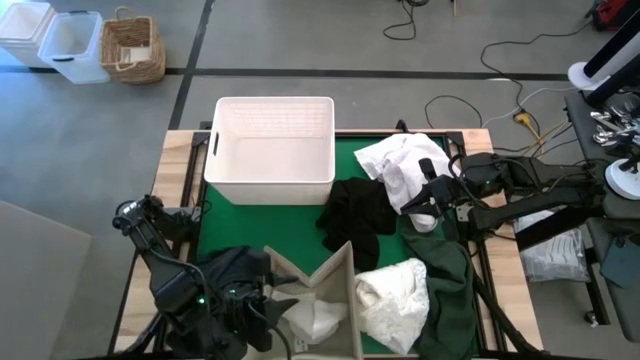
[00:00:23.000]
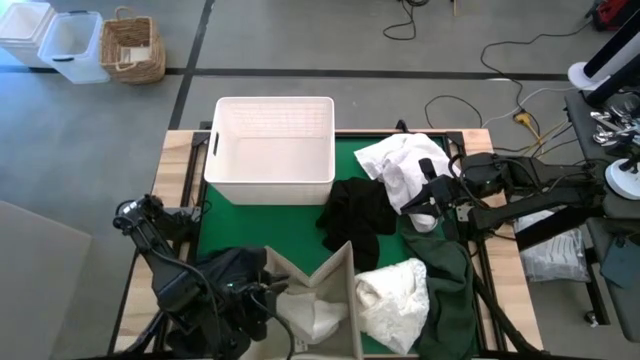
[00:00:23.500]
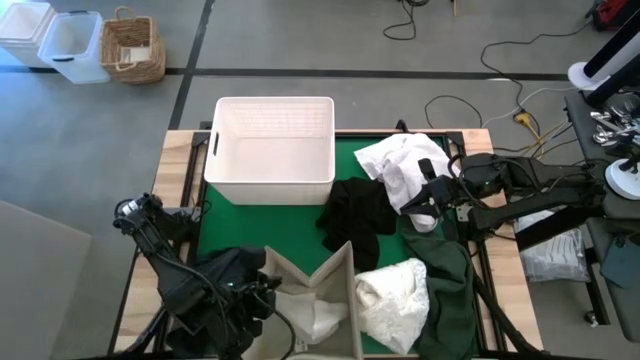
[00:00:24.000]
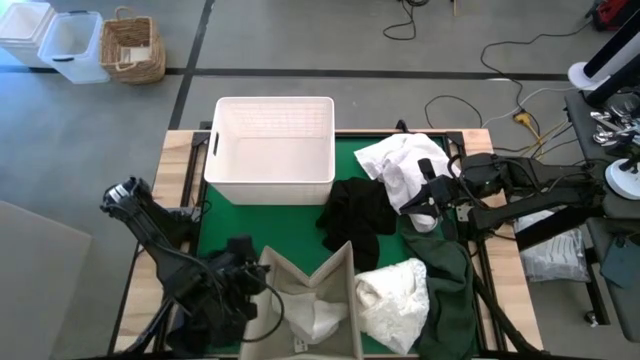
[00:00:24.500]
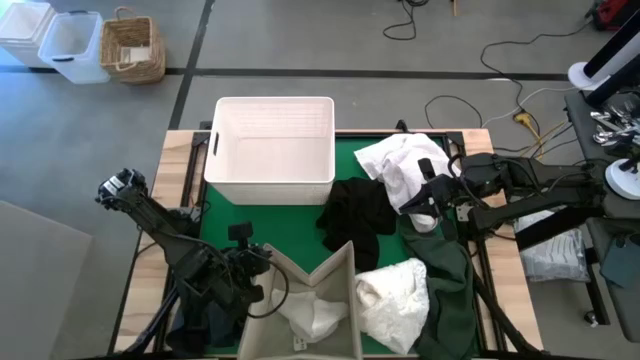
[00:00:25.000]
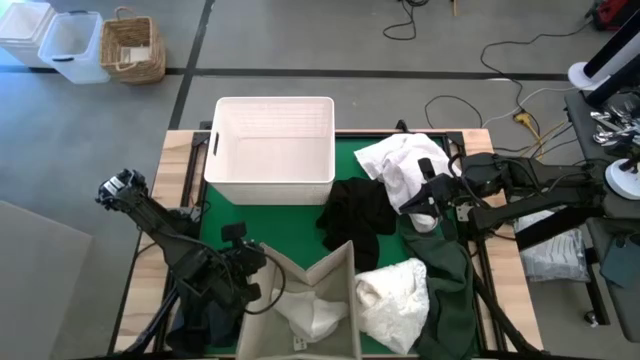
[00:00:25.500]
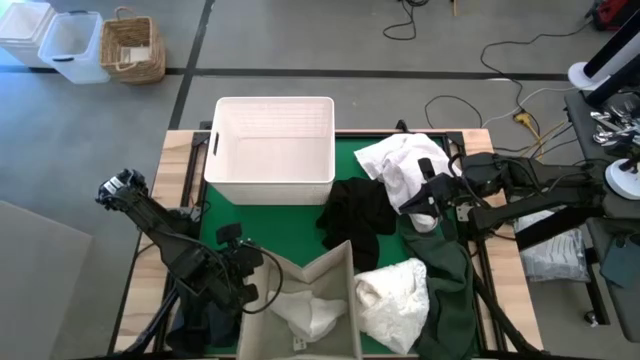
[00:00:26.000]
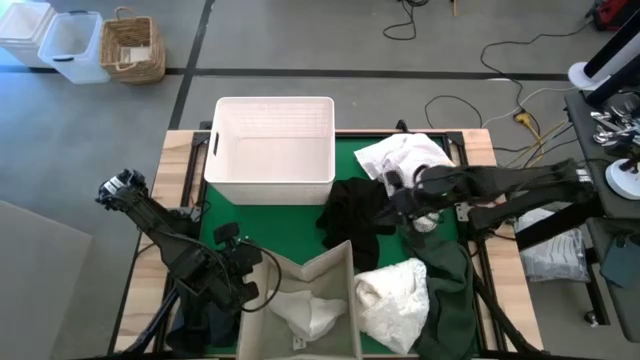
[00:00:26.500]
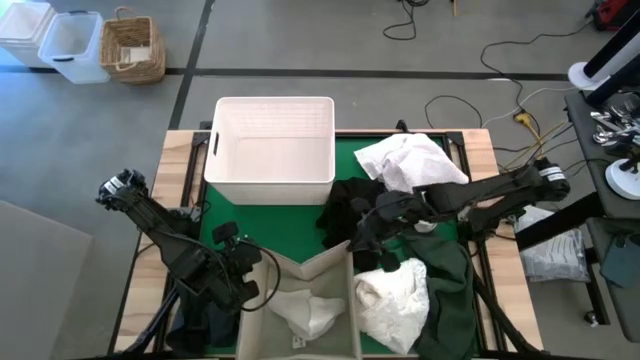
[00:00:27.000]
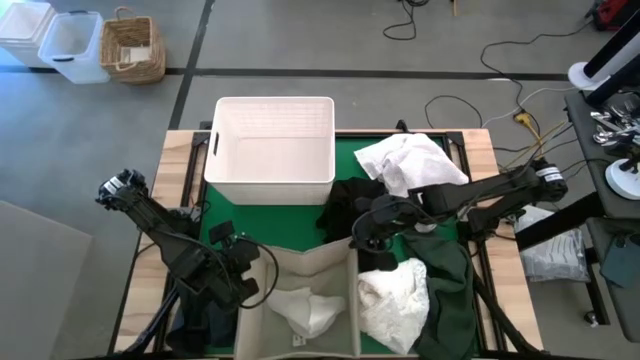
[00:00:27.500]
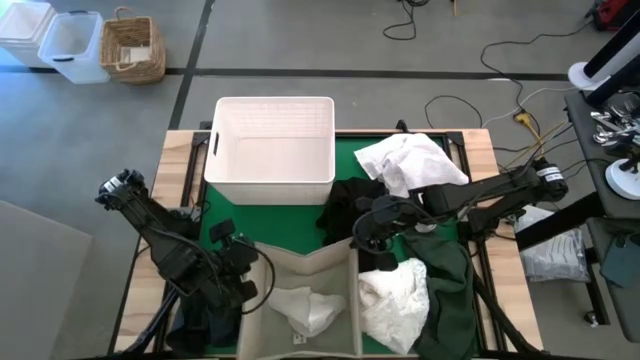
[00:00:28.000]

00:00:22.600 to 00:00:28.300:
Adjust the brown laundry organizer

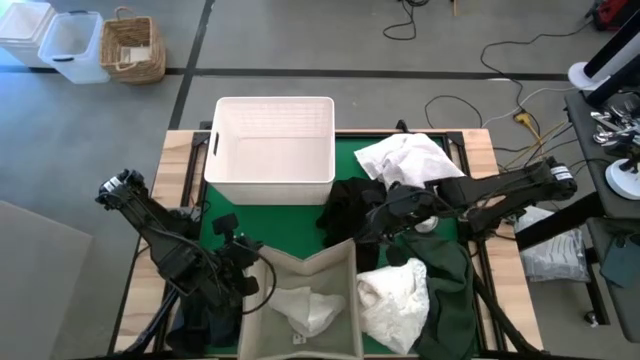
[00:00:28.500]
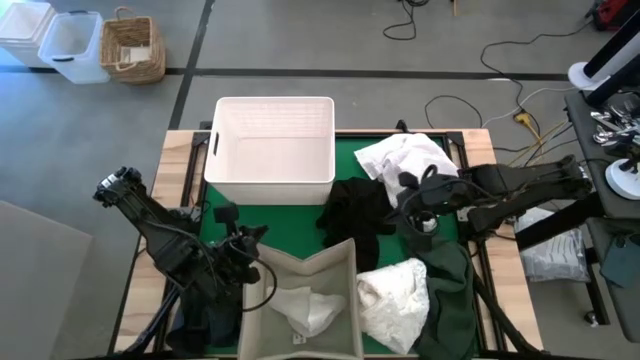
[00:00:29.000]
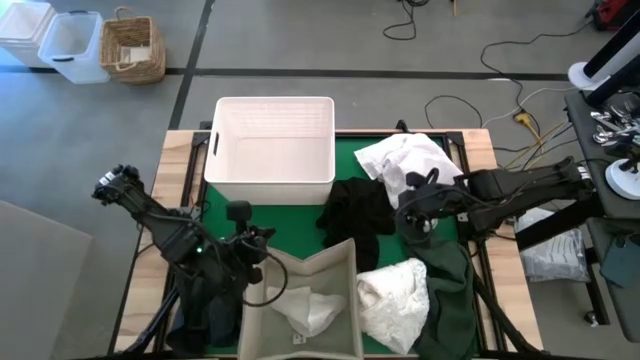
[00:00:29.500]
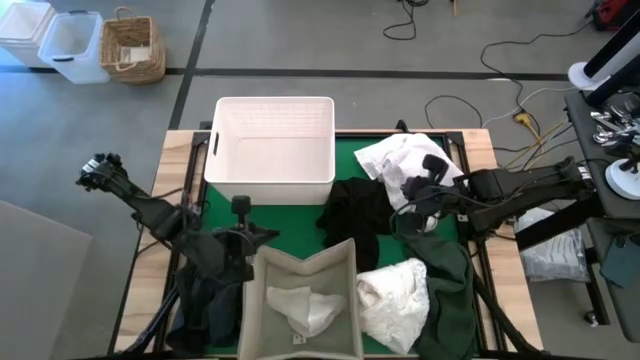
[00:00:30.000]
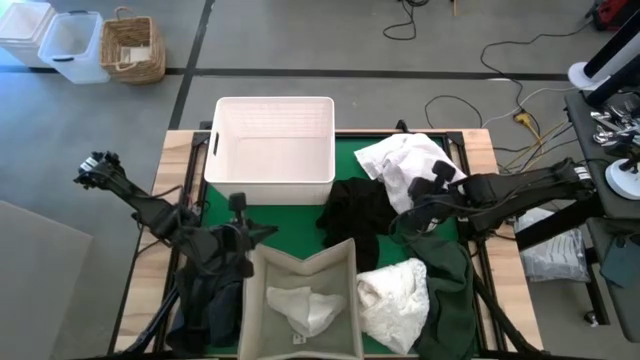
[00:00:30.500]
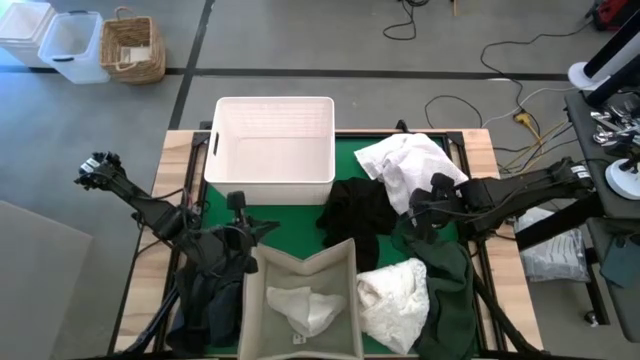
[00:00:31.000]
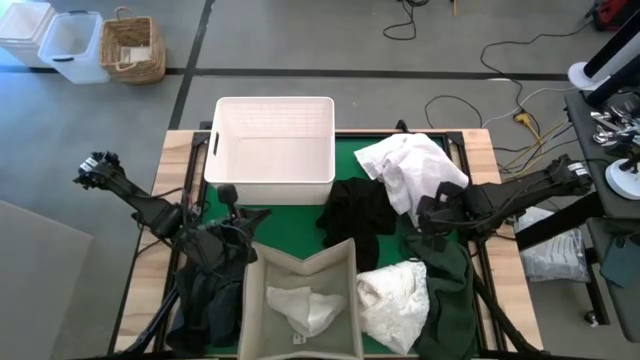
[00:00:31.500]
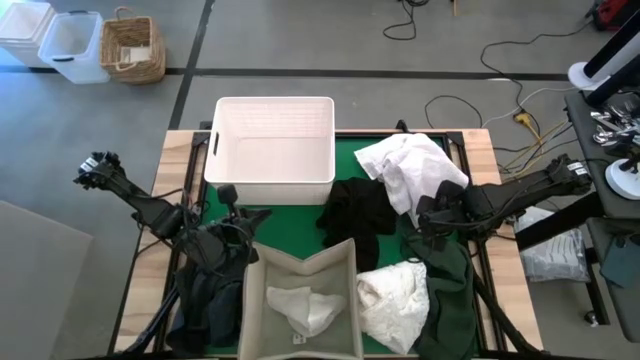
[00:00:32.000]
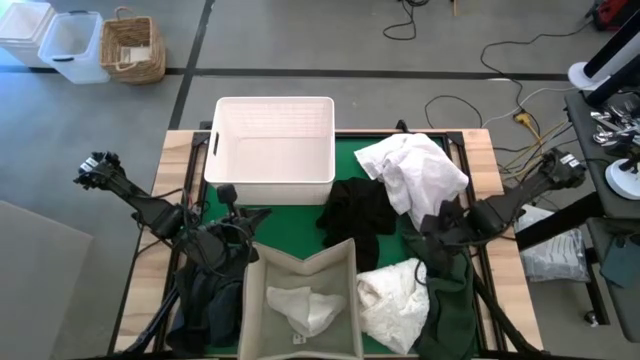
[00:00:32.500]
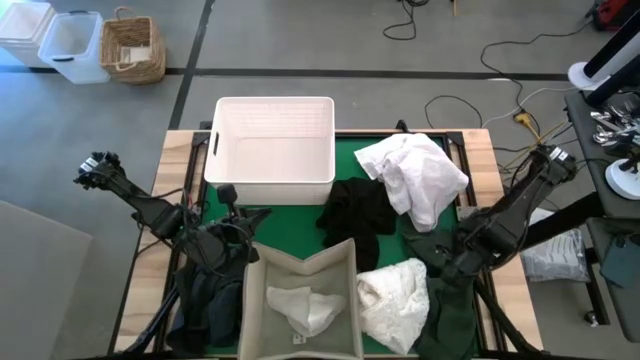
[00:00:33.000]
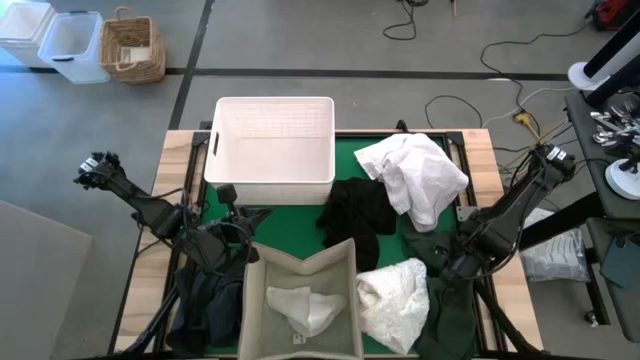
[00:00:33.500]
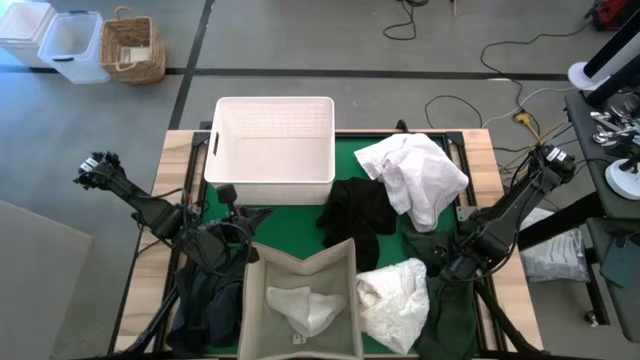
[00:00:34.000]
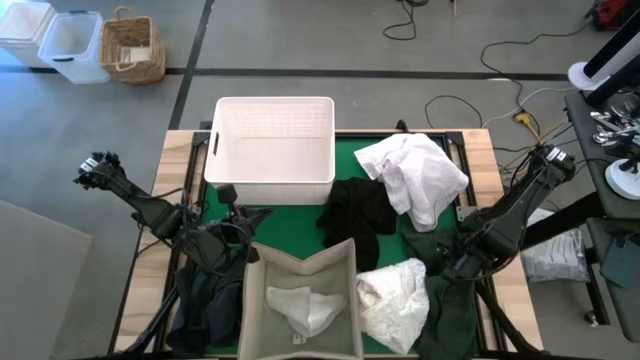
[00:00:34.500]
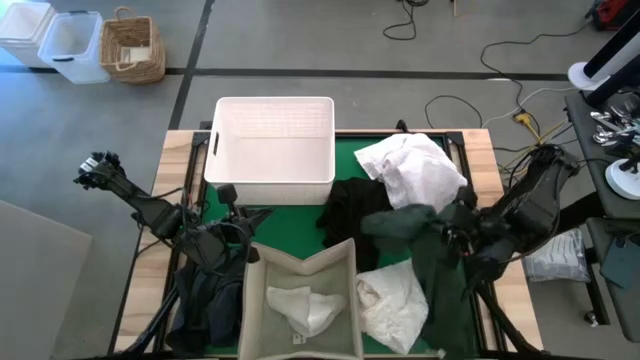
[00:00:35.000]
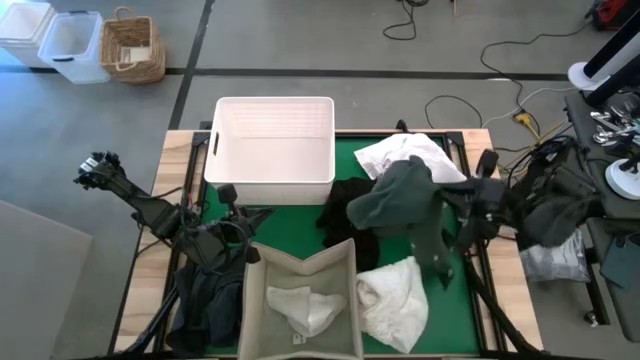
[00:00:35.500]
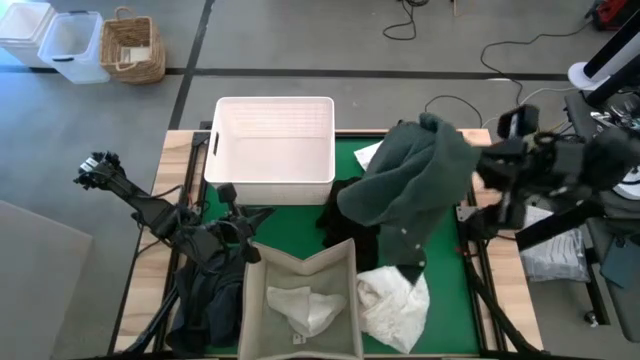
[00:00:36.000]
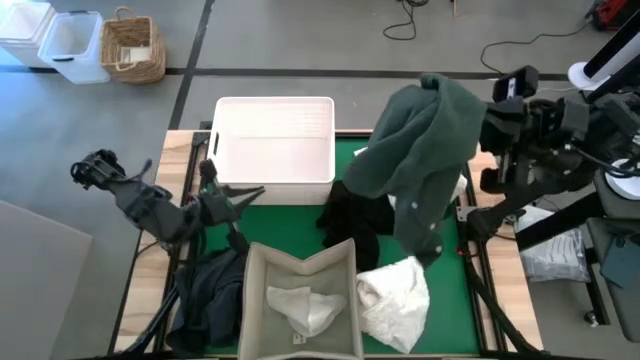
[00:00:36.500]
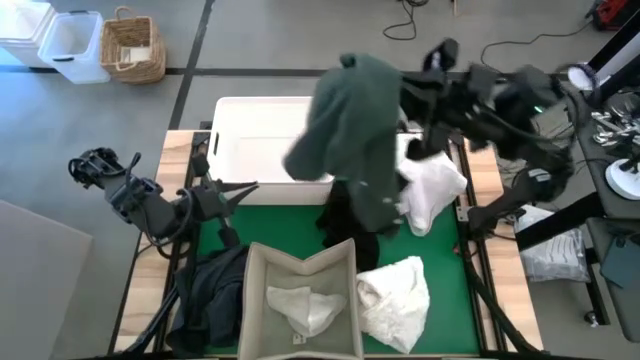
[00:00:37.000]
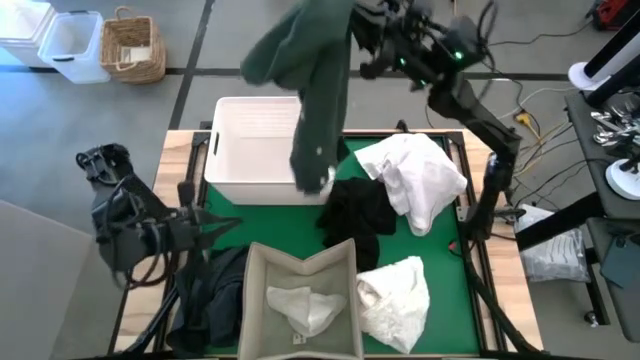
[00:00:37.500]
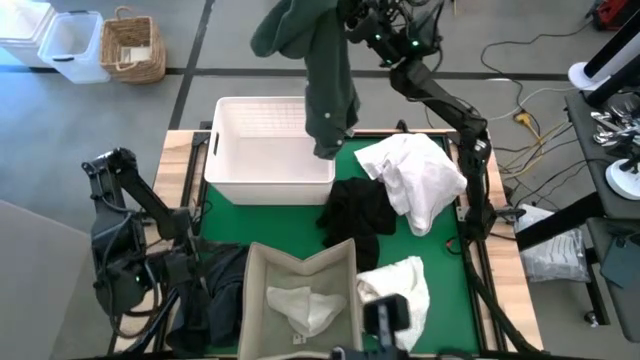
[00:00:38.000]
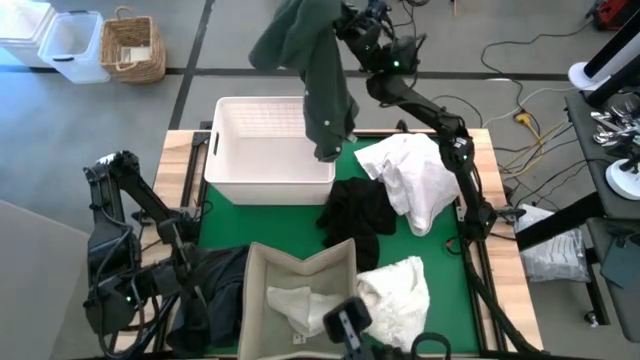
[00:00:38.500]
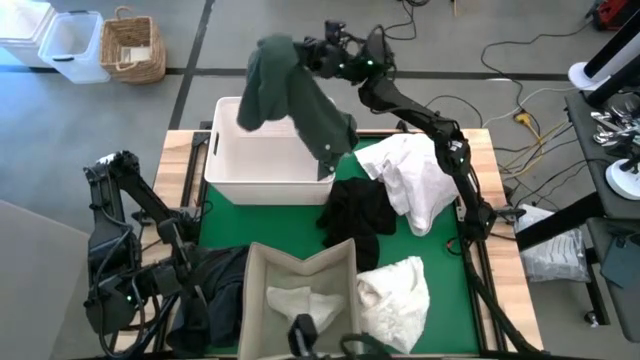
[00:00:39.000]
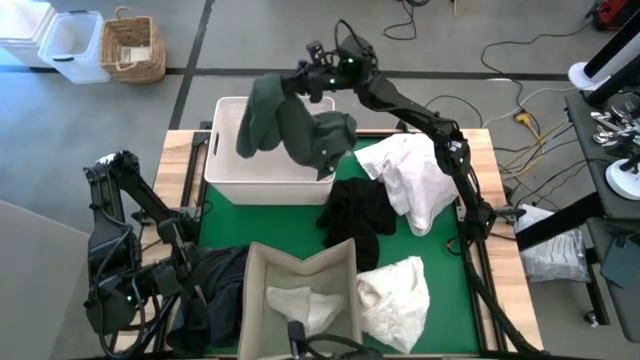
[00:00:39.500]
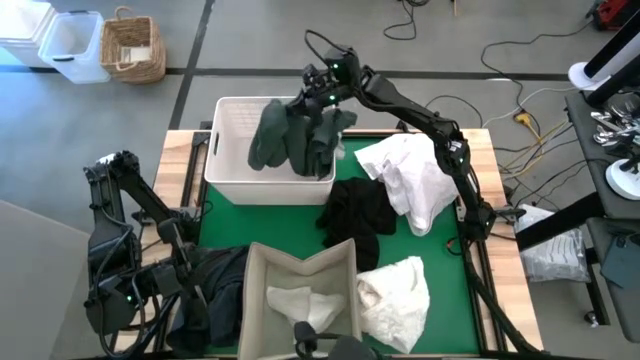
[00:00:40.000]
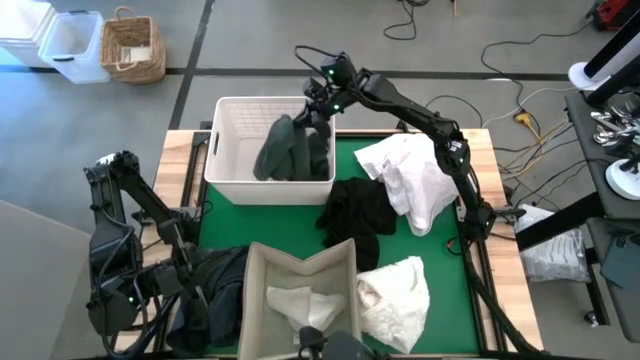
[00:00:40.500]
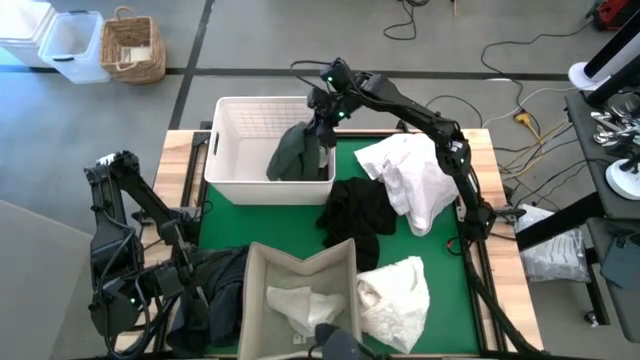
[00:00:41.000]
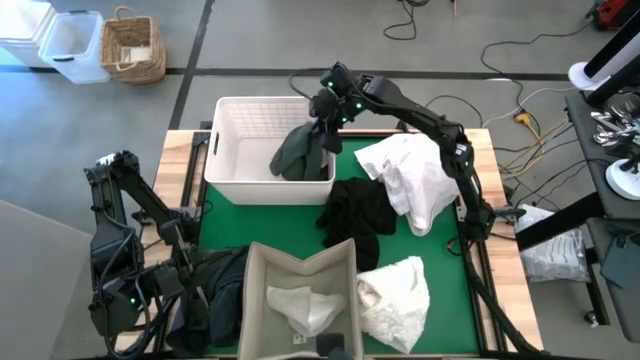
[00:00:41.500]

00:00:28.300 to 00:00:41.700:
Put the green shirt into the white bin
